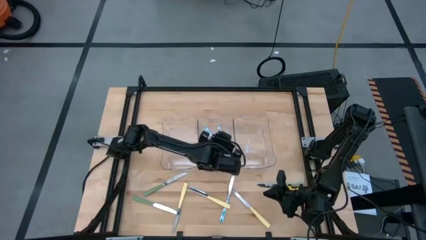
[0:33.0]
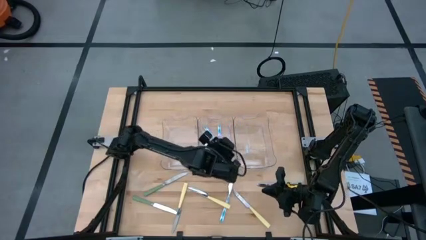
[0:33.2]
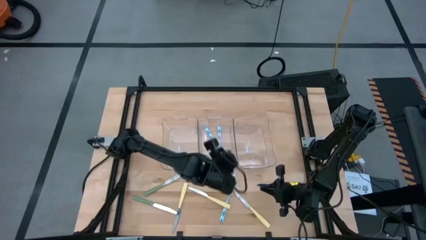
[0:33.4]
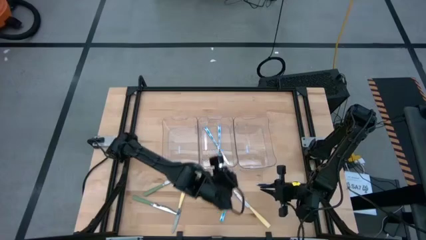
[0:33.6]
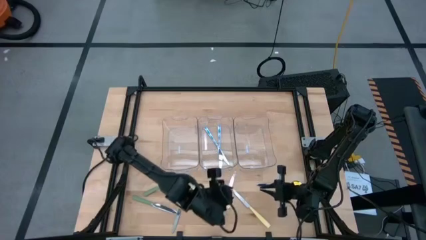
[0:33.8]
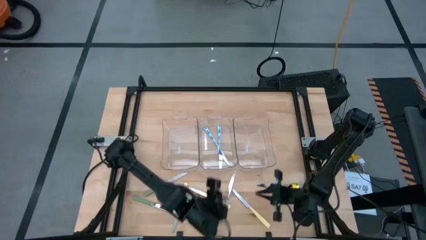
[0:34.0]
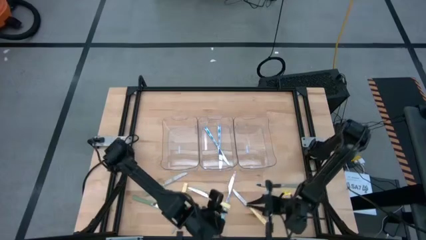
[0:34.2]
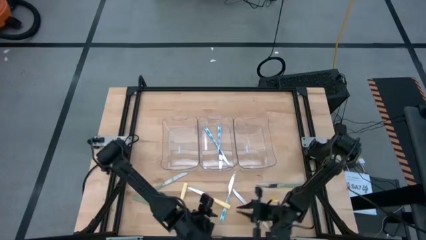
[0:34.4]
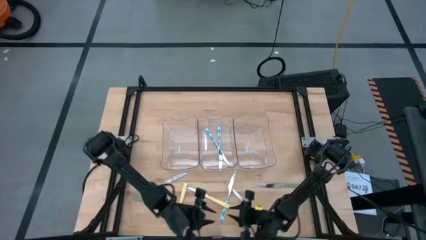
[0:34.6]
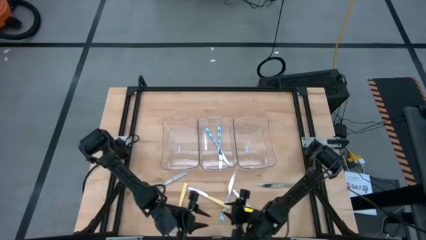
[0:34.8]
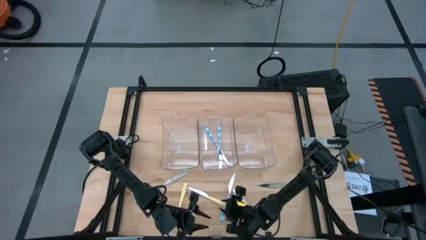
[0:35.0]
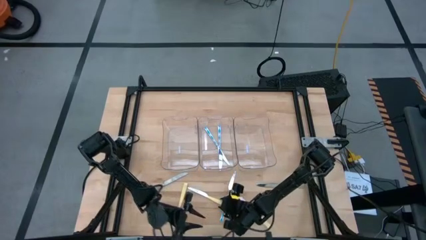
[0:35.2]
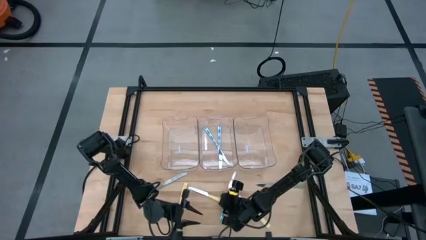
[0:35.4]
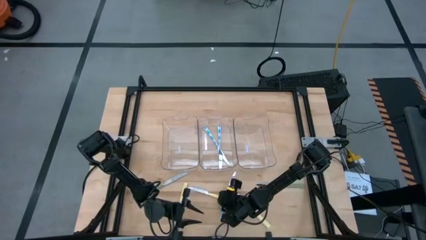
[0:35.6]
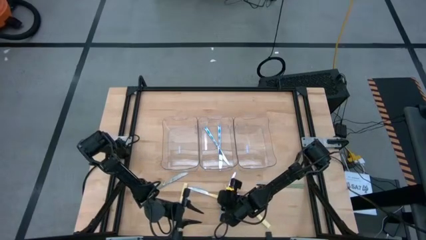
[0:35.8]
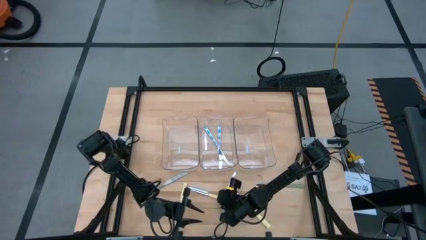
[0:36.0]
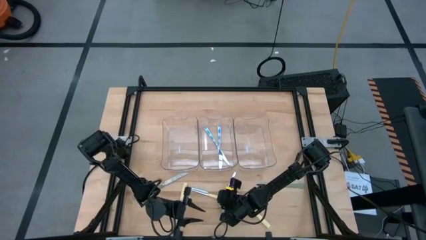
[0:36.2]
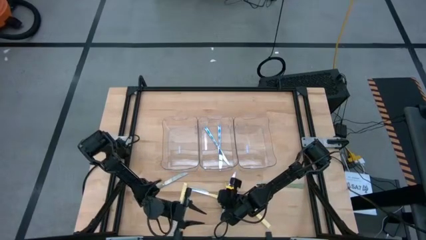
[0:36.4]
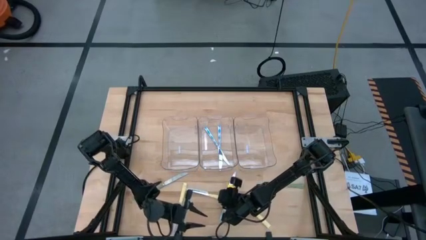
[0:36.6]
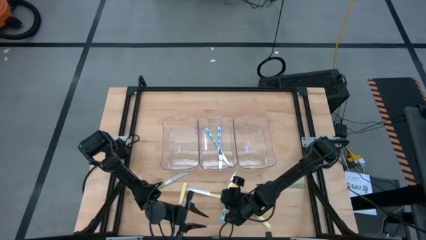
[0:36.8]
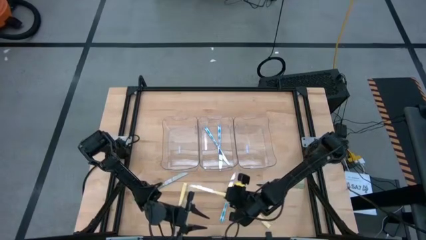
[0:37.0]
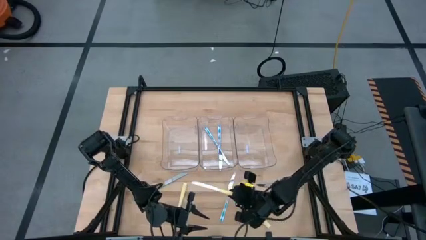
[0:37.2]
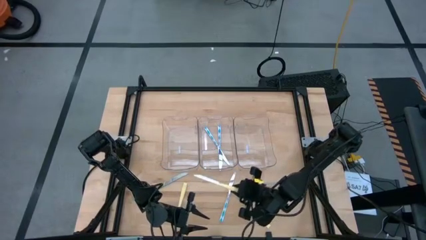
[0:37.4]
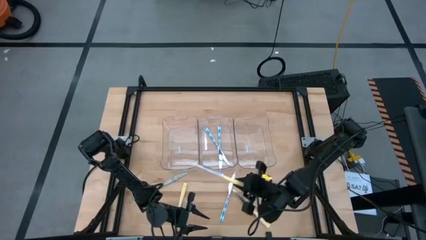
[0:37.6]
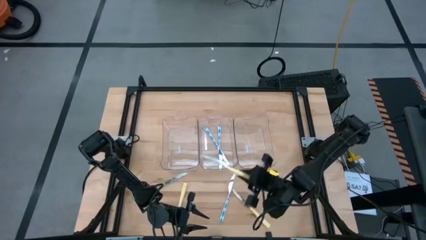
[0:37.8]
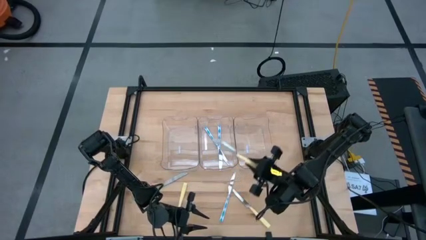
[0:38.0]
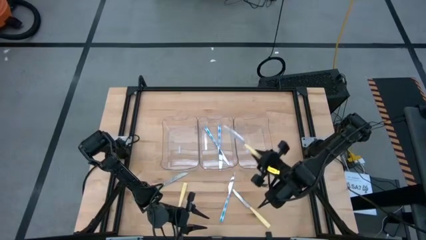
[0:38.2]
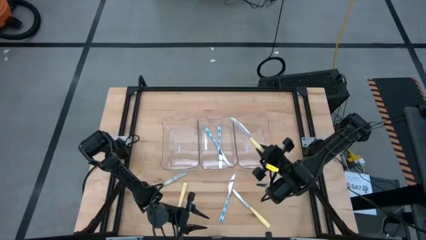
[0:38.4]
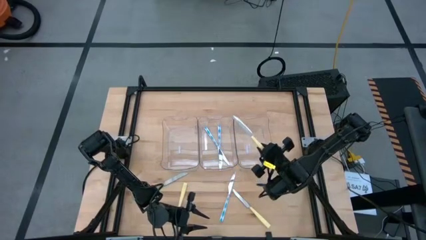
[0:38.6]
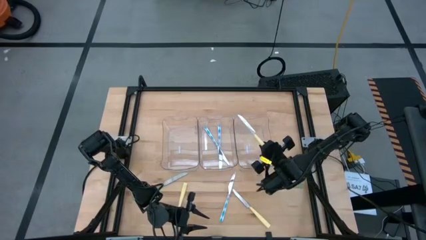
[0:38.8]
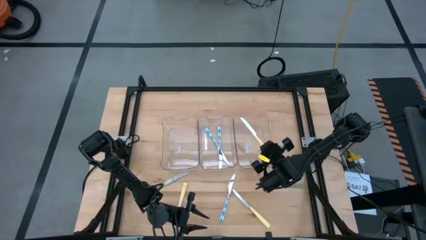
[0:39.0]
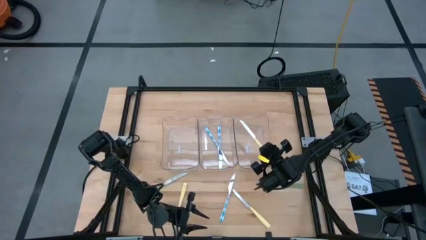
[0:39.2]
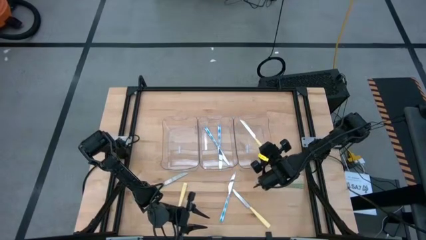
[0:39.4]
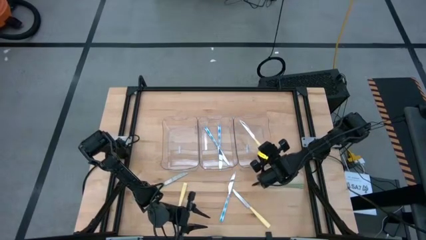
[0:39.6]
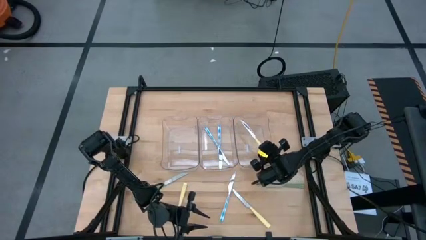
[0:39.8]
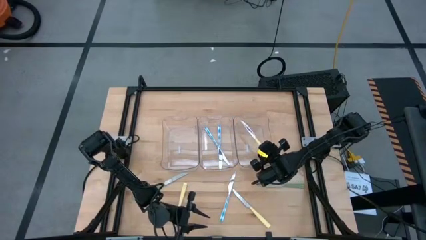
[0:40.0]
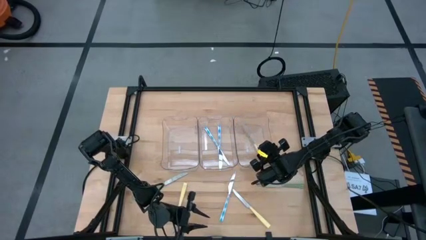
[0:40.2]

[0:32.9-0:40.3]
Task: Sort silverware by color (type)
Put the center yellow knife into the right transparent bin

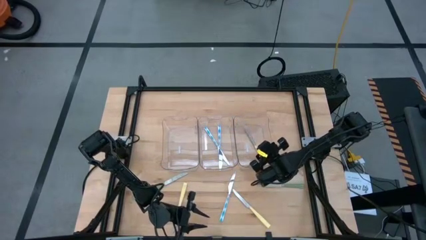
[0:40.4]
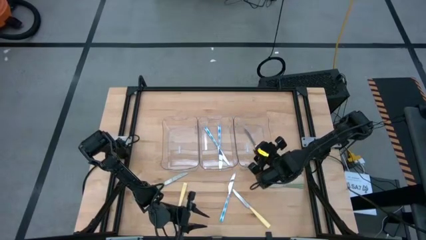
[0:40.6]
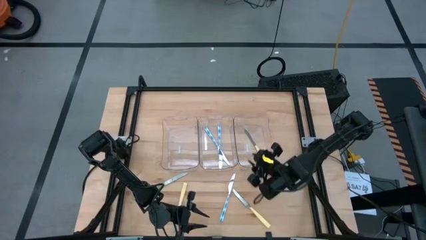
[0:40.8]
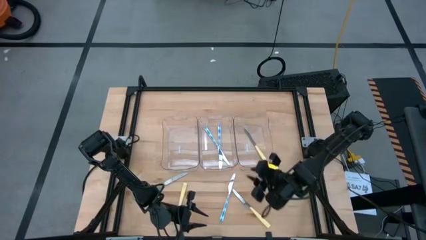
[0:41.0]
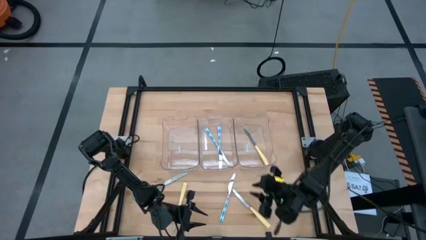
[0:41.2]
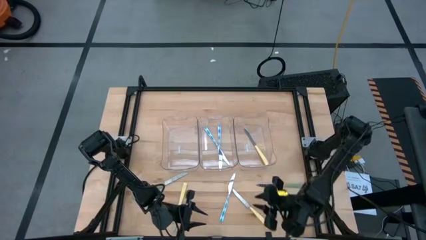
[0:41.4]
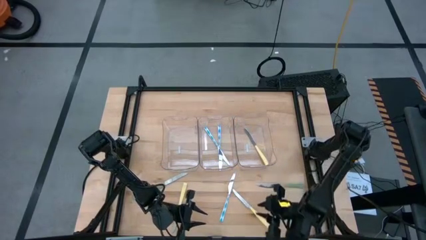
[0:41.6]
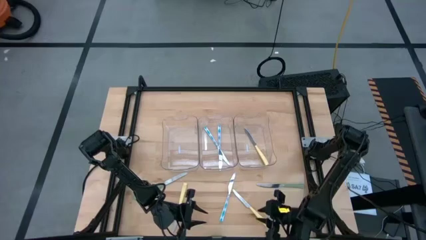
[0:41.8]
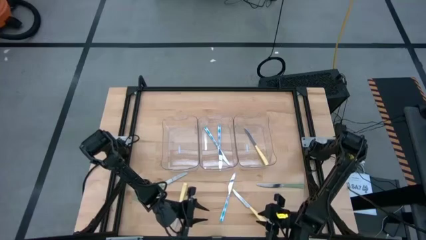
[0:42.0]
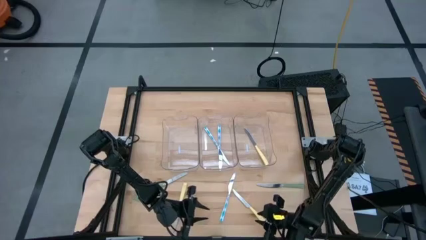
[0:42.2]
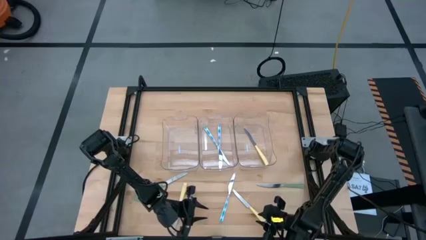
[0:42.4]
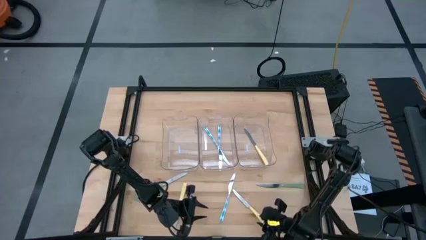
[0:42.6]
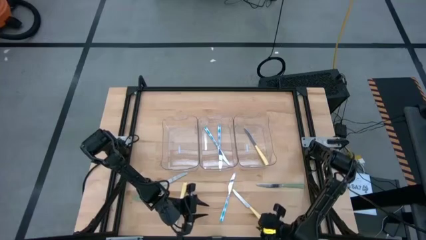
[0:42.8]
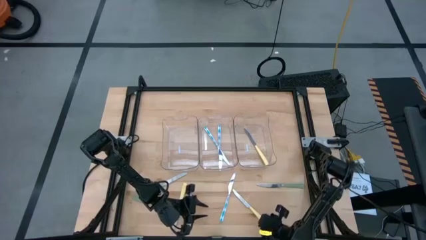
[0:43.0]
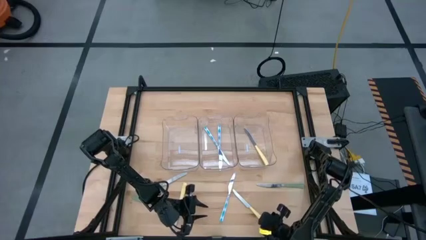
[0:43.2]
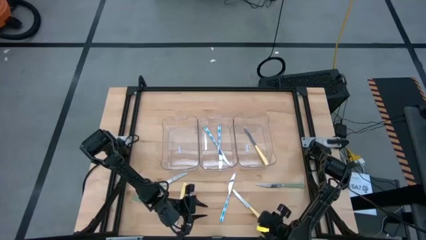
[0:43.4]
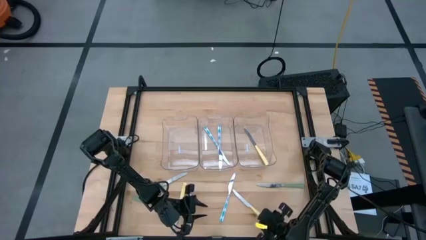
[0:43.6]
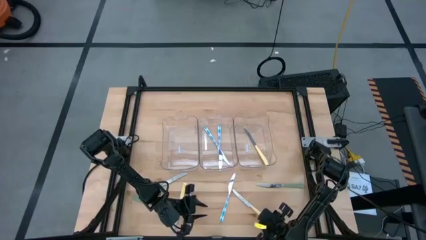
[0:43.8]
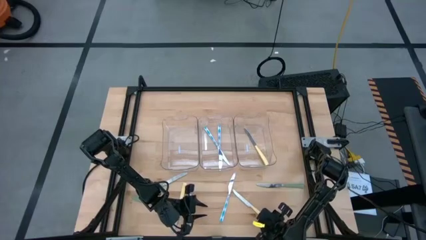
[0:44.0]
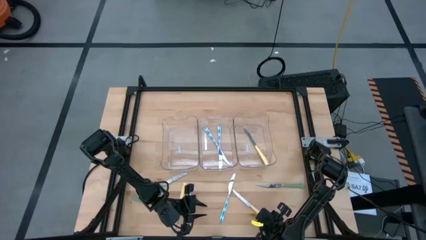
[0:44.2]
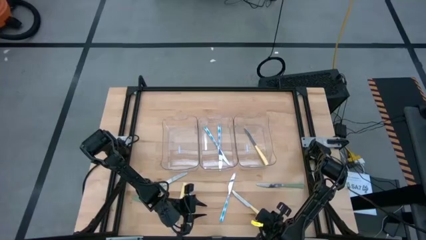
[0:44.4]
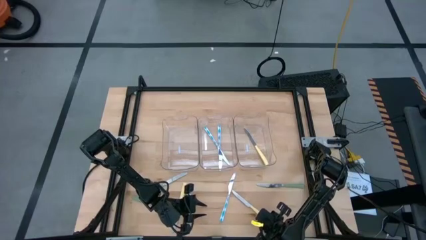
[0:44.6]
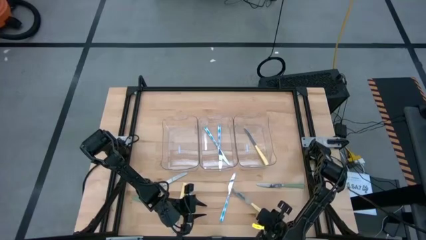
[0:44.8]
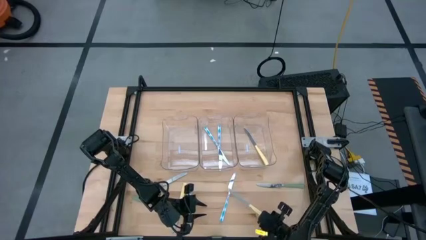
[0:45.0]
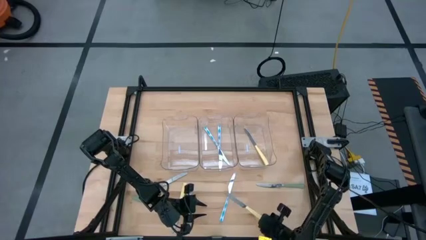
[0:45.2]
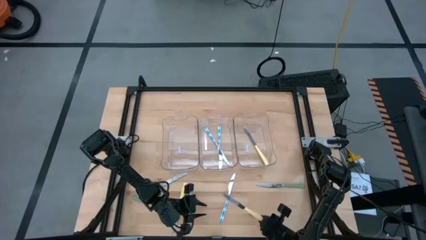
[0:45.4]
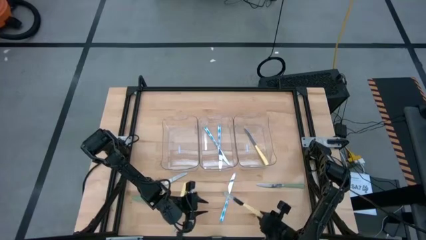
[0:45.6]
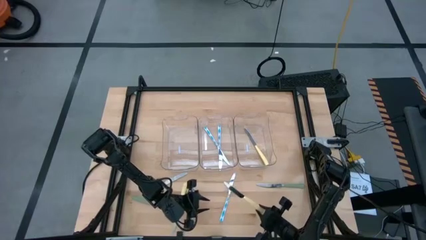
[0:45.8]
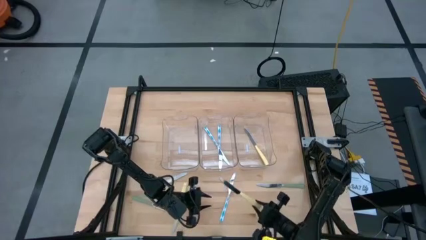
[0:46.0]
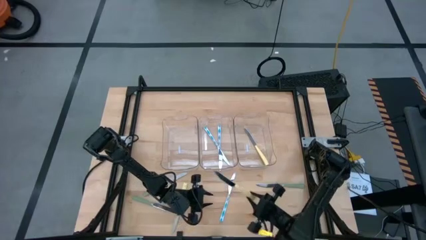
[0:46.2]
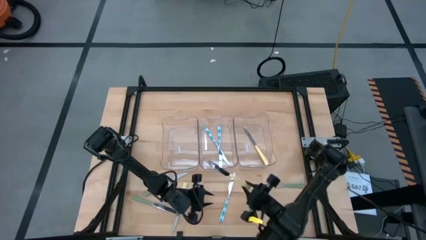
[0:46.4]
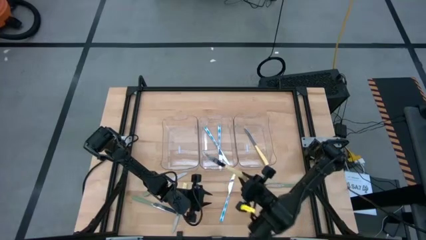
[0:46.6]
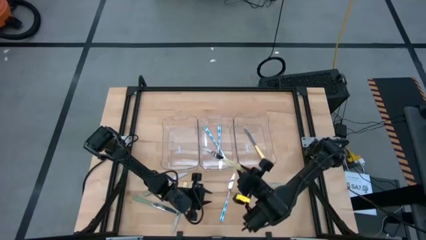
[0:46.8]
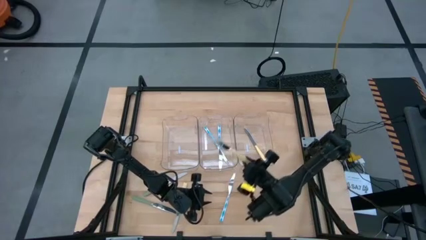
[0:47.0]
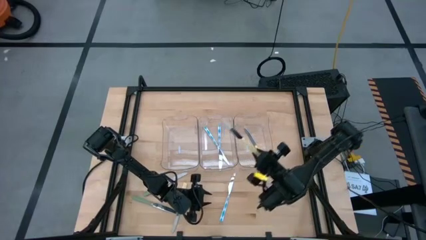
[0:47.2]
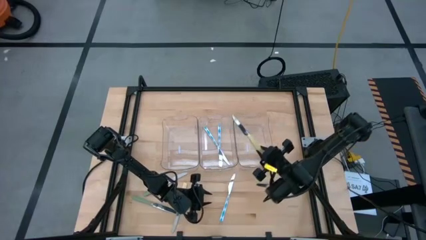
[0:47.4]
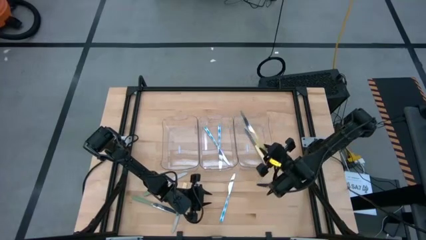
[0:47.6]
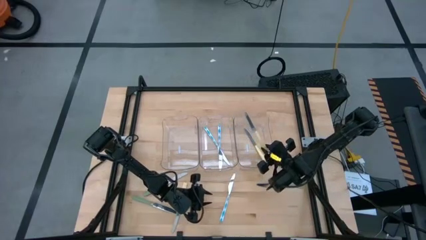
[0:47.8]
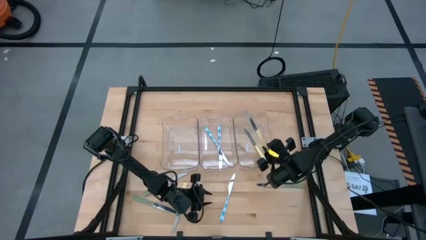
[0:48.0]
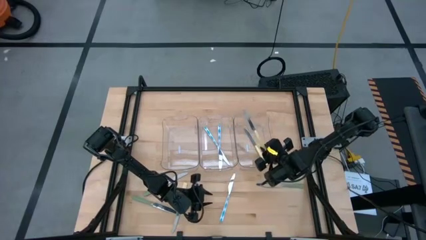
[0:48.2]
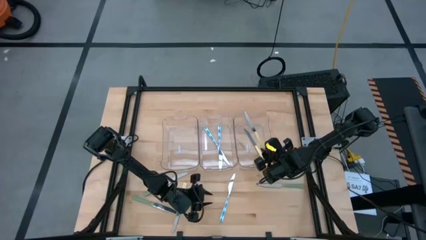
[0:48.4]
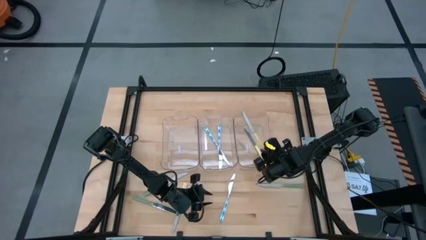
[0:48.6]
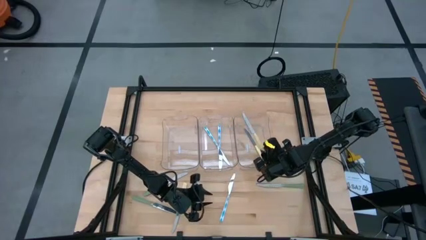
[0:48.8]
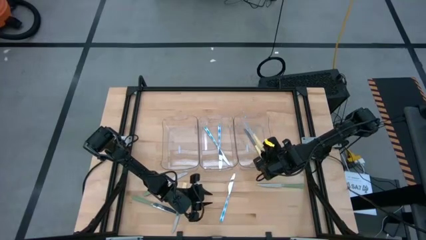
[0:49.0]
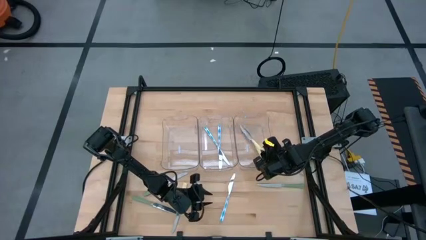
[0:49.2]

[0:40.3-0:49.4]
Put the right yellow knife into the right transparent bin
